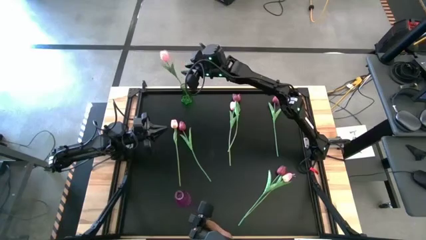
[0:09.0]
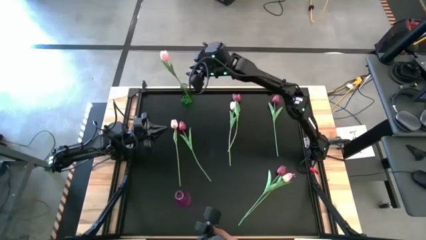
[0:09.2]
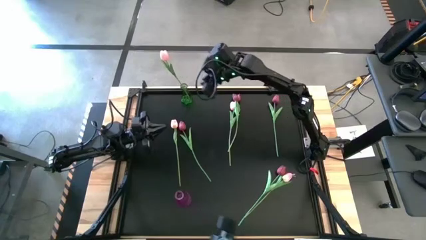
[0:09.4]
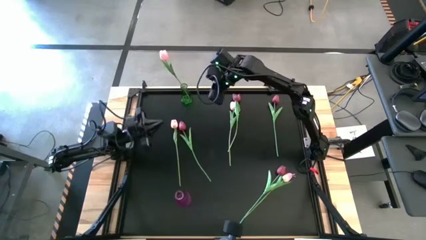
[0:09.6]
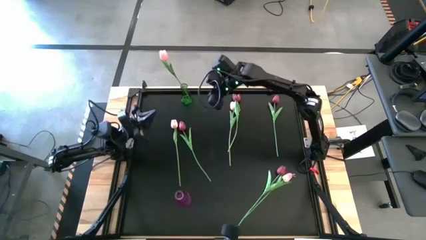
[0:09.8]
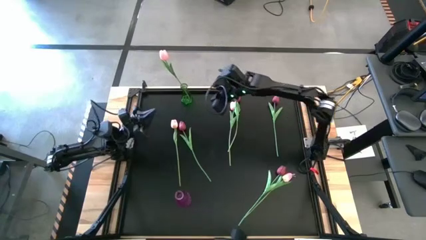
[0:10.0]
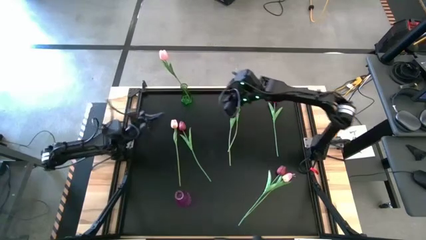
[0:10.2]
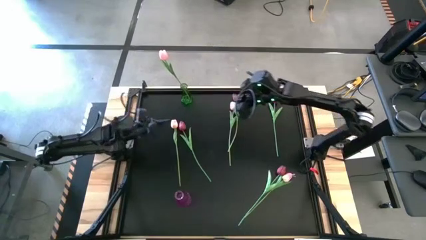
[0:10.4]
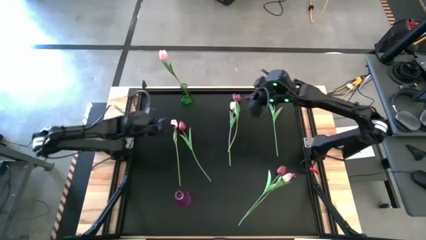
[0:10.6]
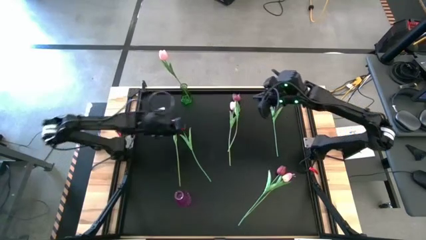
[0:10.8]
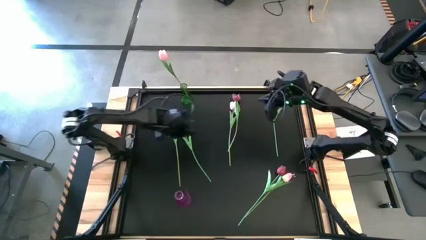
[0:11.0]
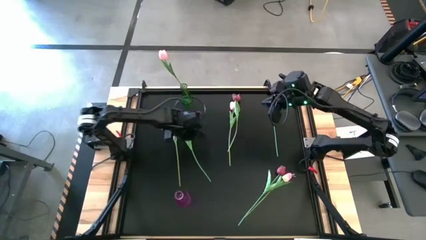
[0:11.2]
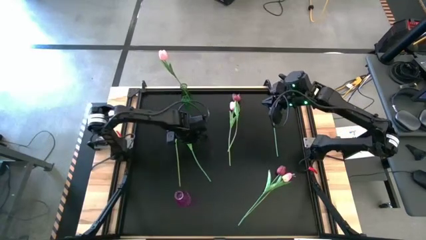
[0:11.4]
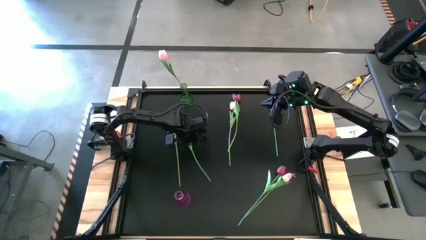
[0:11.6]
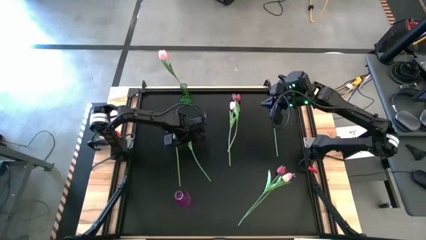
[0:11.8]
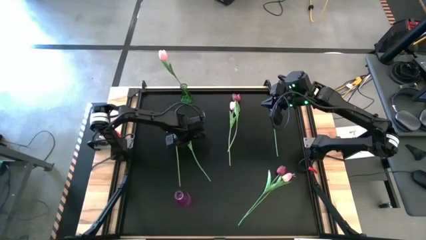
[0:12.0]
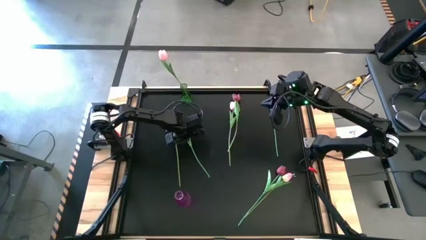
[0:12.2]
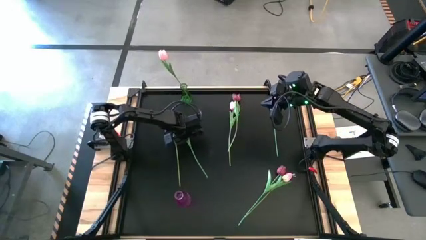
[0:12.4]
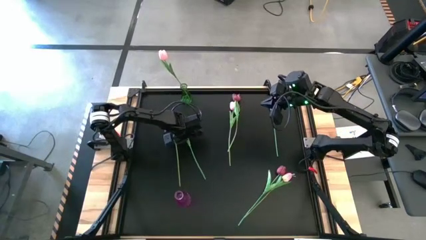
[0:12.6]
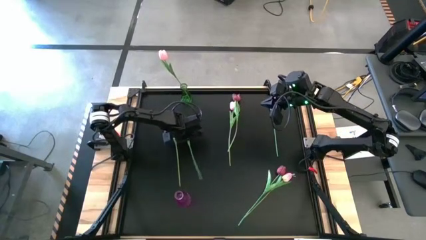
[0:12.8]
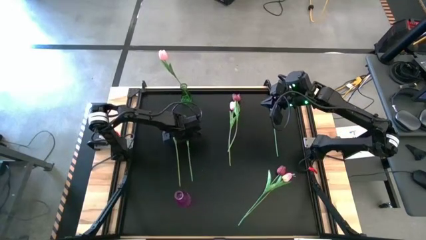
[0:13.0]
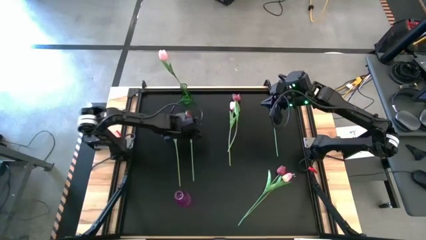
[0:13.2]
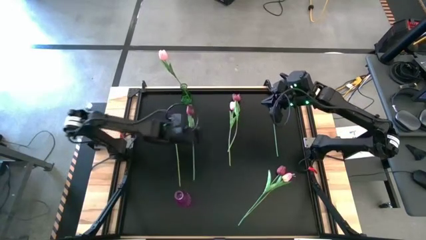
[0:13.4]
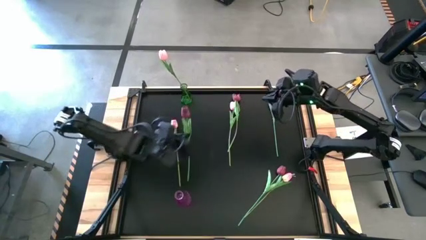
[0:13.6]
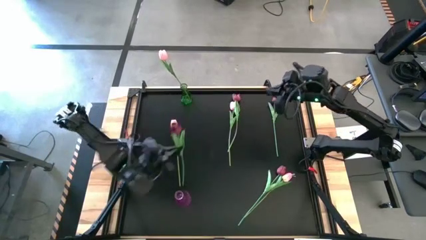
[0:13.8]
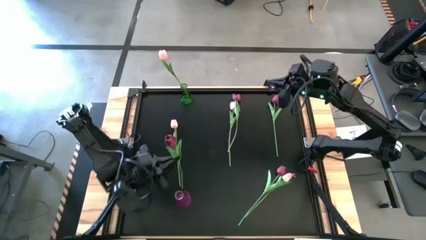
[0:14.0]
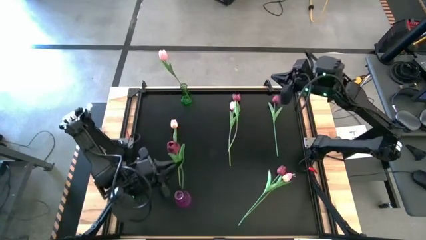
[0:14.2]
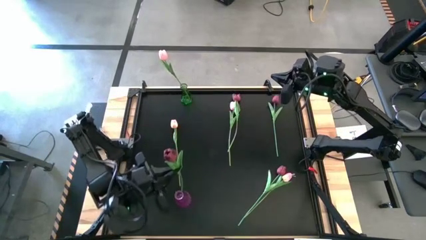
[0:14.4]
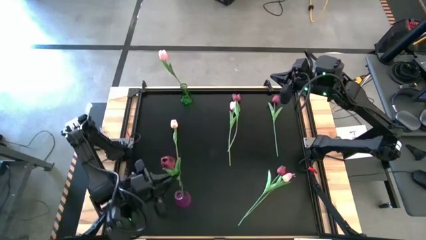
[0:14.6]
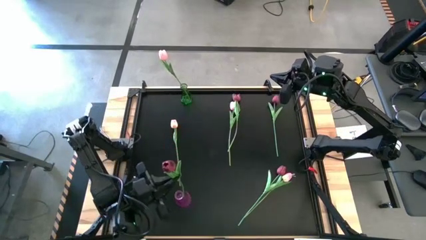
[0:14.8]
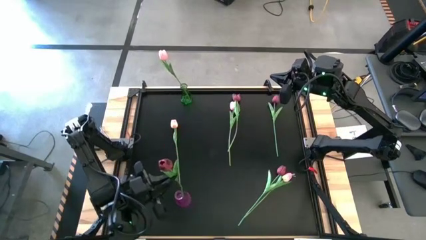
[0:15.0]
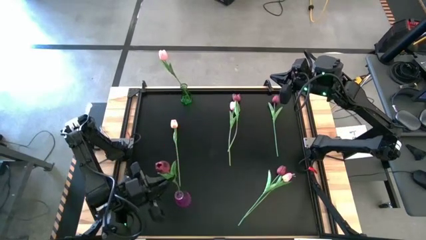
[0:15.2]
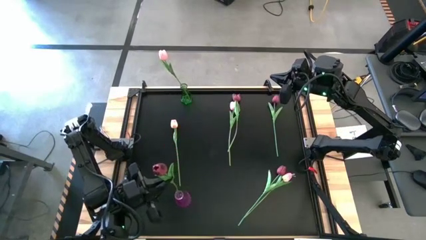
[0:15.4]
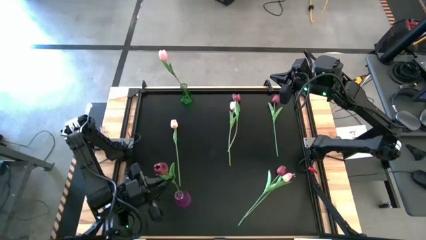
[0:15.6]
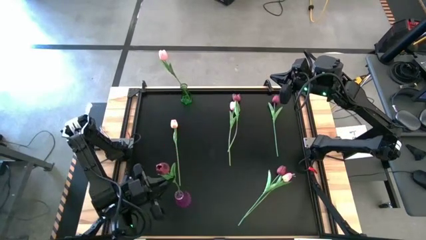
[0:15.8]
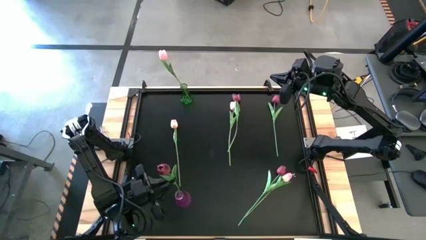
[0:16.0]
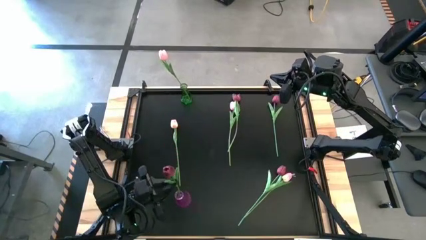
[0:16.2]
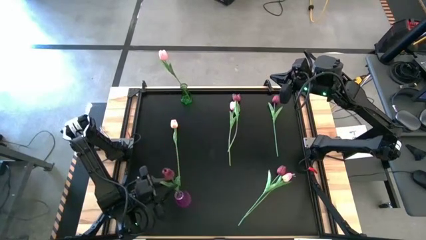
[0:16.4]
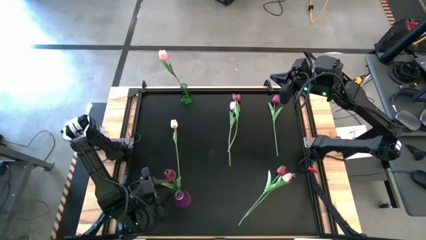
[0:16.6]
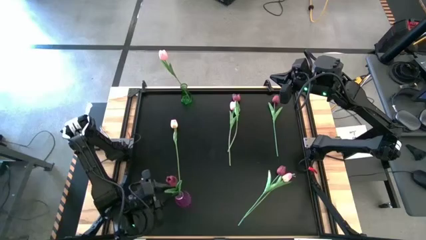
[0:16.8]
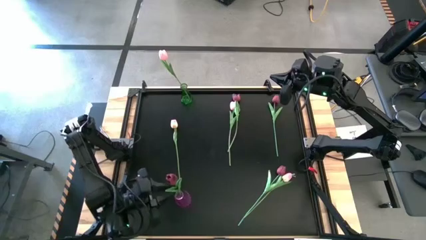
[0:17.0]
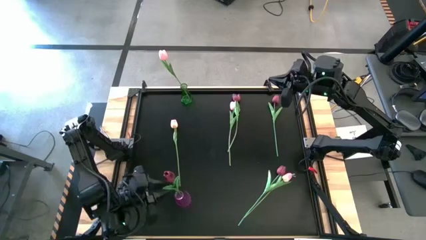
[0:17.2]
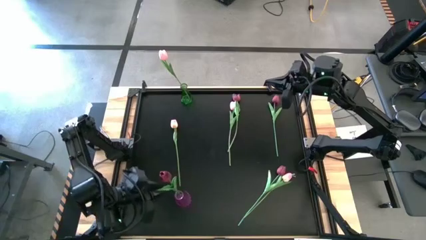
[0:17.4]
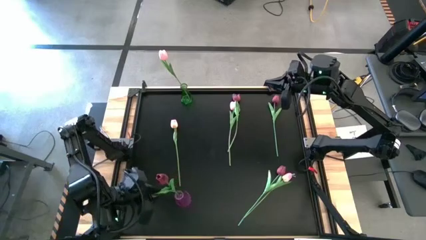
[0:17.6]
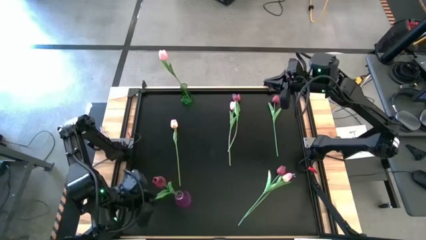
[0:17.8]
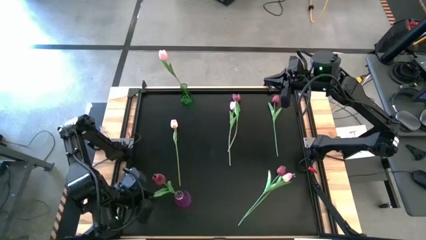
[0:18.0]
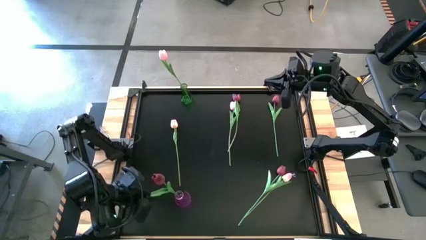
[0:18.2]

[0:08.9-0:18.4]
Task: Sort flowers into vase by color
Put the left red tulip into the purple vase

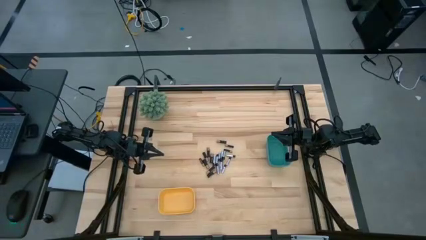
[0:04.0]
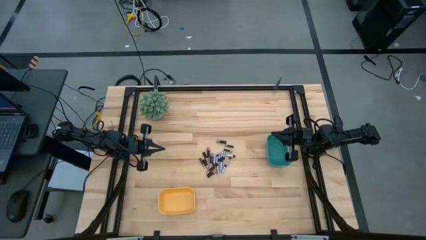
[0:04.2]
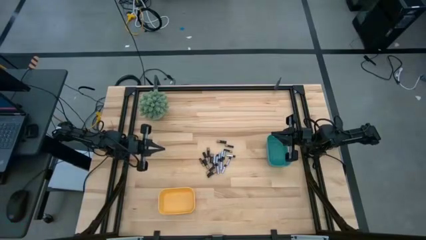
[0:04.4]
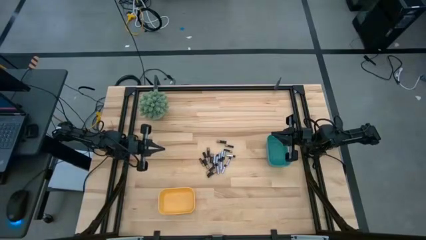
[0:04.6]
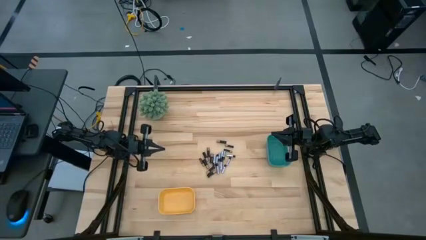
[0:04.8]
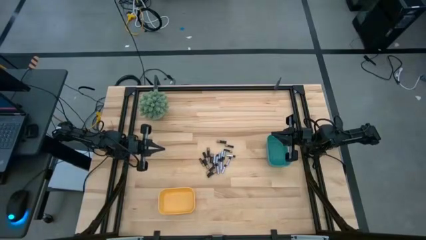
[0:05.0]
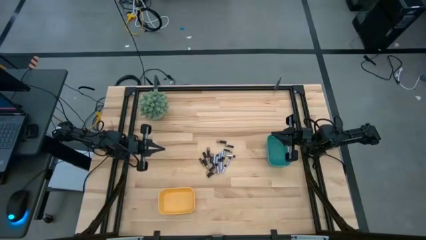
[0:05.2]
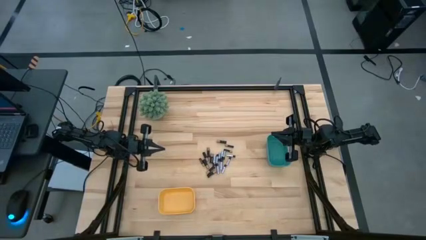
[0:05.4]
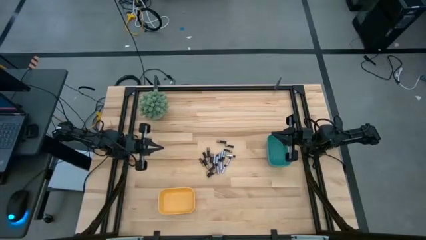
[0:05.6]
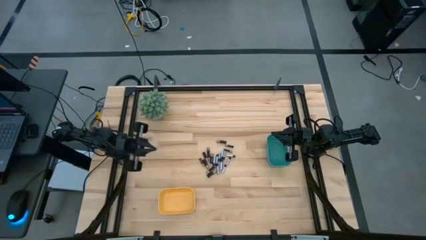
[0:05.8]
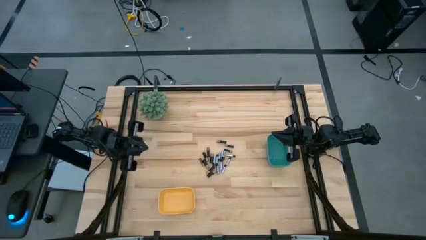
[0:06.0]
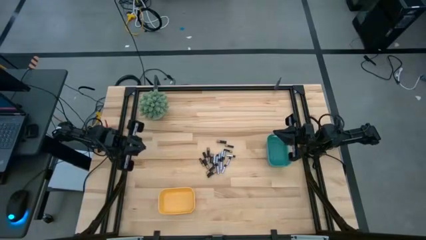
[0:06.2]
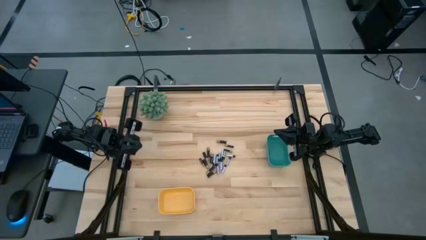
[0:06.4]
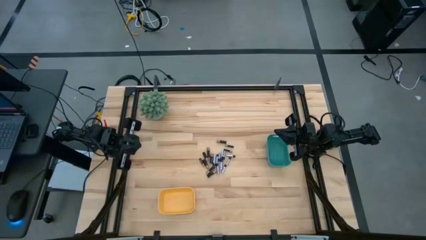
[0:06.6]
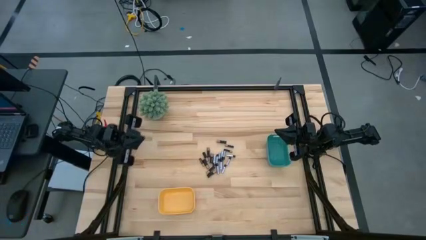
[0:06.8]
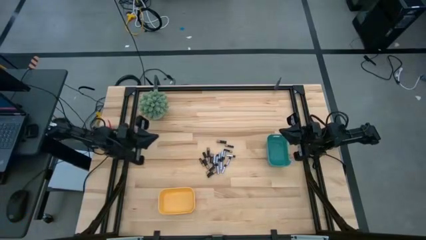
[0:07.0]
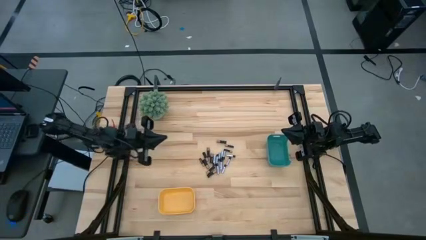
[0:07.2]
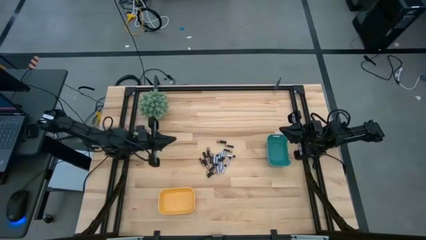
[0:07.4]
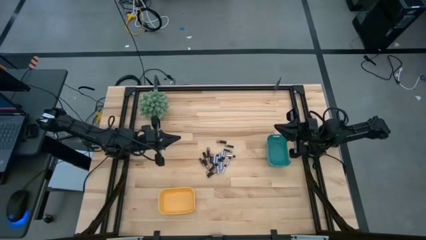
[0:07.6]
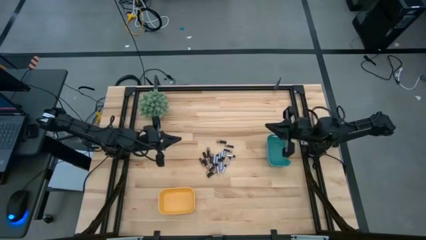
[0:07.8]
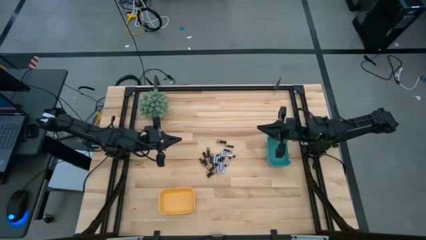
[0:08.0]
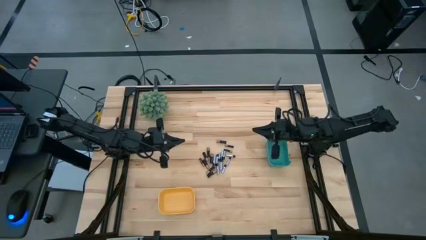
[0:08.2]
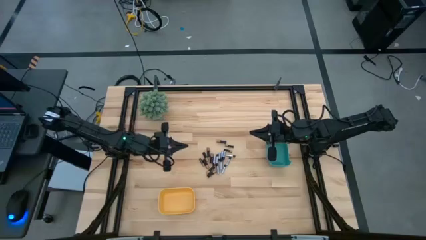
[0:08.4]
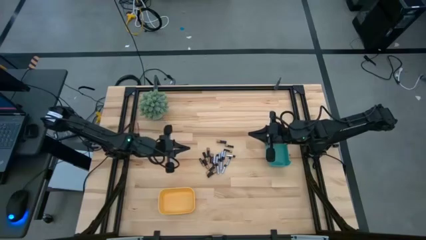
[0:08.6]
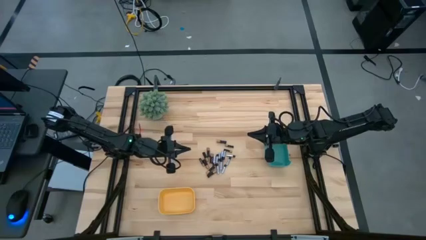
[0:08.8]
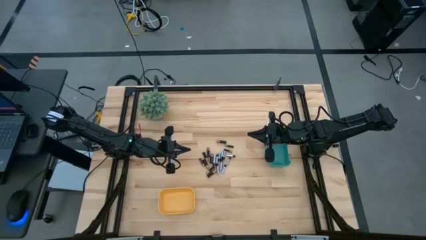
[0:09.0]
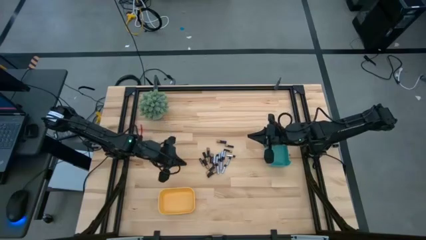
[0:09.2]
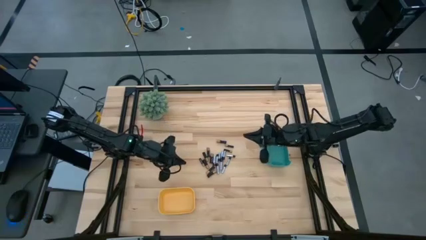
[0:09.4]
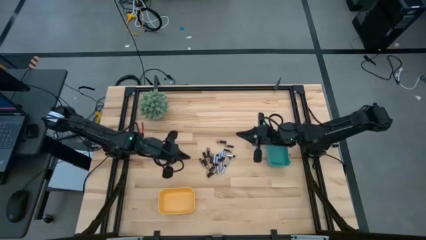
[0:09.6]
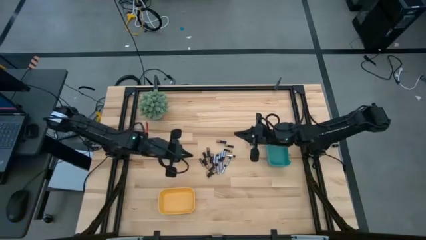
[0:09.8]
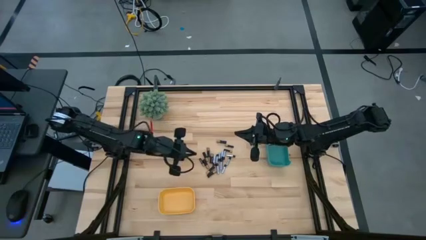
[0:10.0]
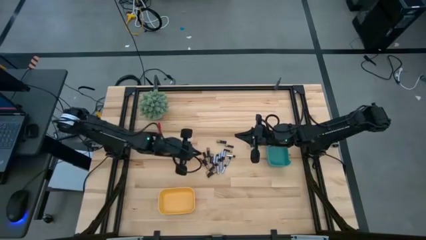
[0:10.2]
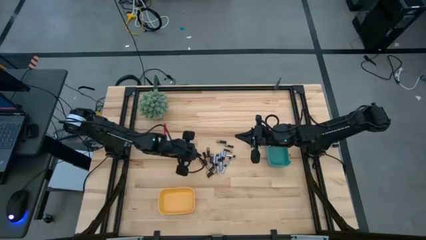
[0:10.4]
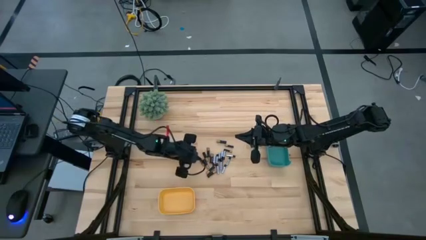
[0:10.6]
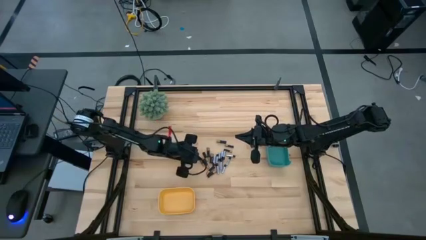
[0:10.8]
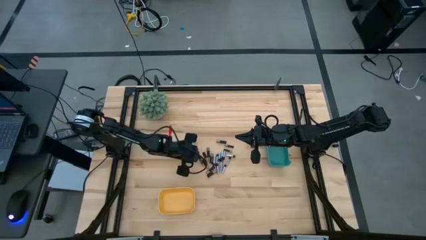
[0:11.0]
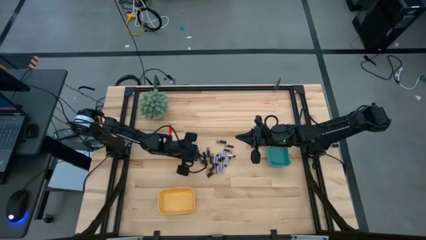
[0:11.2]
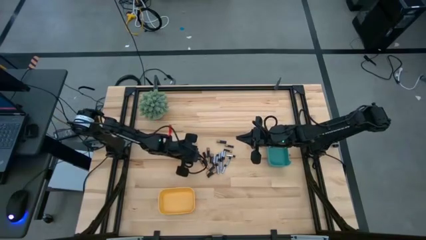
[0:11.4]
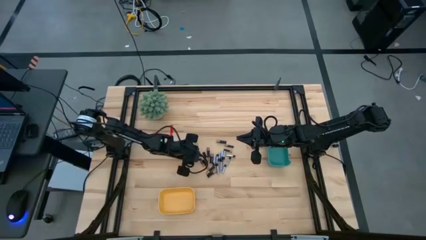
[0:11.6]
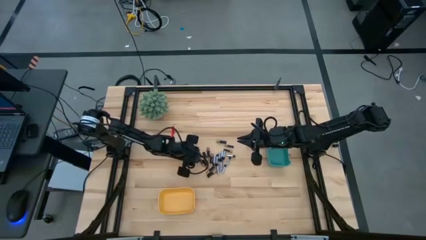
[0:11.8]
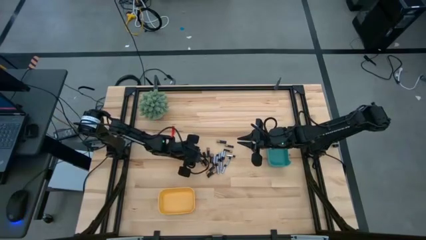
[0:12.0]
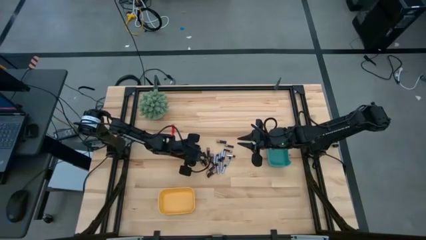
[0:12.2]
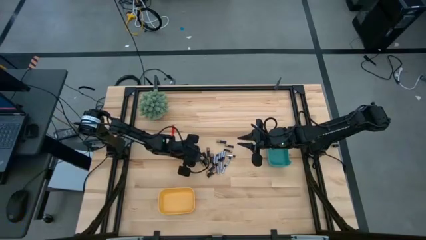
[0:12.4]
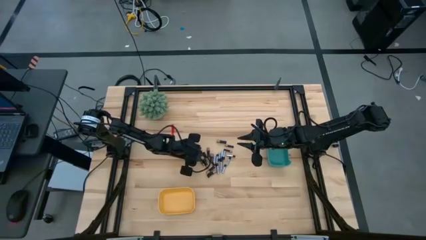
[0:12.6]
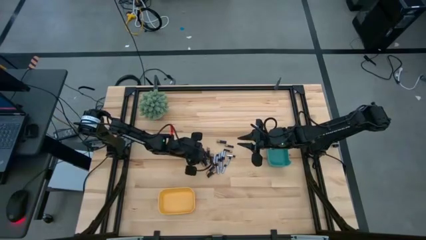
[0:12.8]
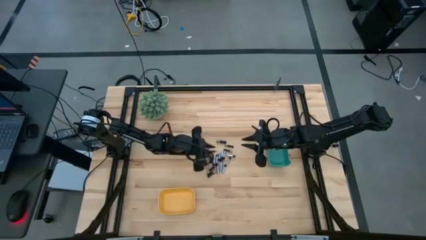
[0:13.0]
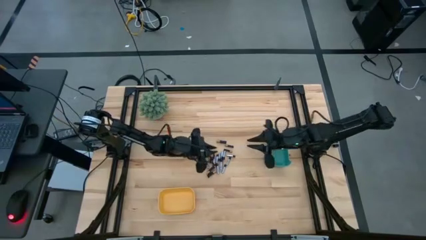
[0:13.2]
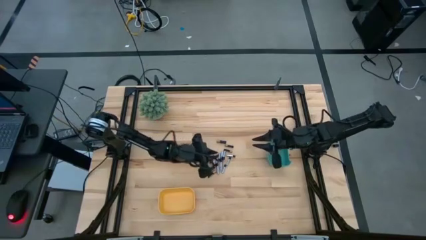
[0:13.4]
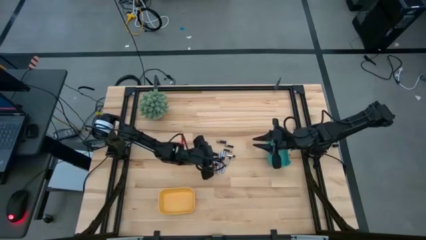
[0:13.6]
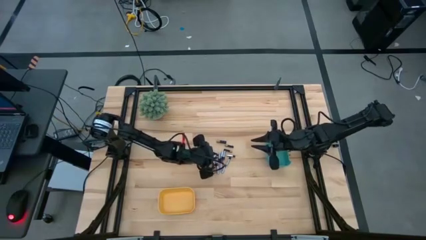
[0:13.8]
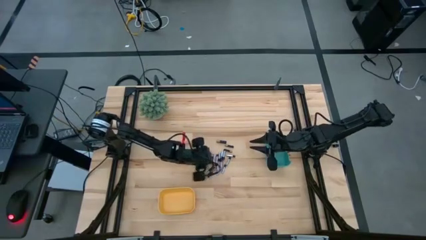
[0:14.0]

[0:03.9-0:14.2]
Task: Sort batteries
Put the black battery into the yellow bin
